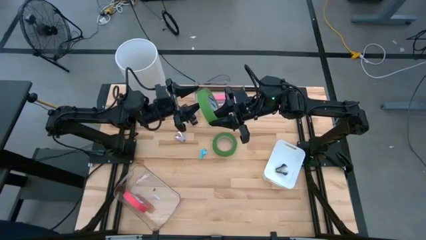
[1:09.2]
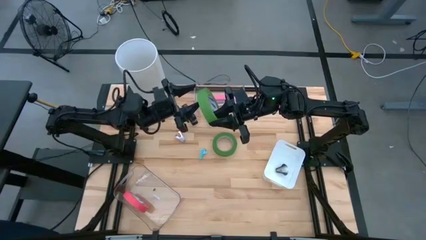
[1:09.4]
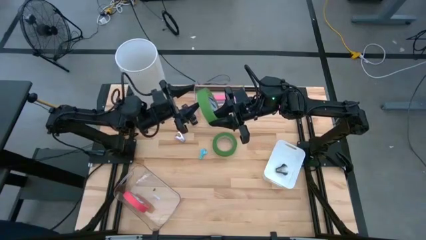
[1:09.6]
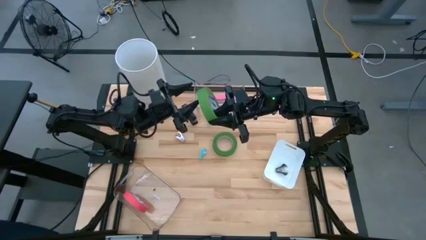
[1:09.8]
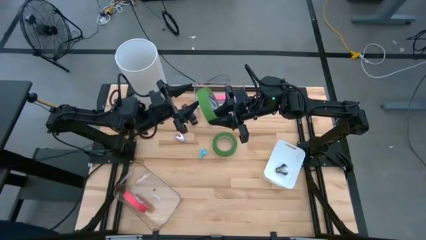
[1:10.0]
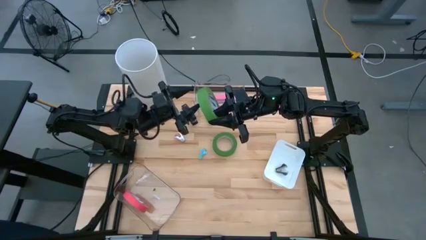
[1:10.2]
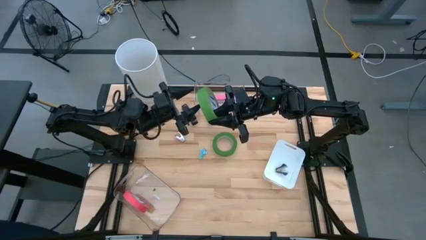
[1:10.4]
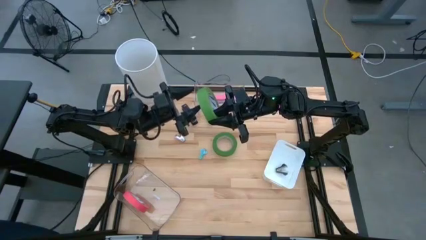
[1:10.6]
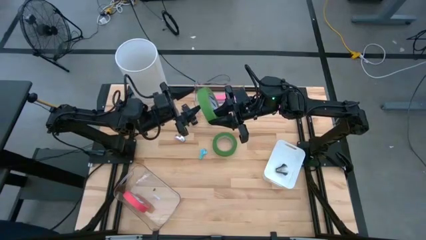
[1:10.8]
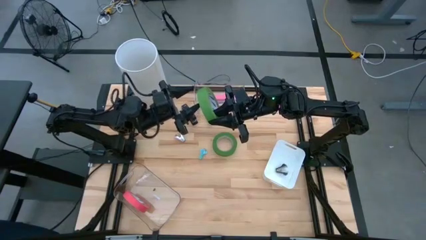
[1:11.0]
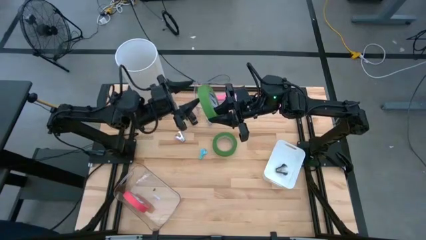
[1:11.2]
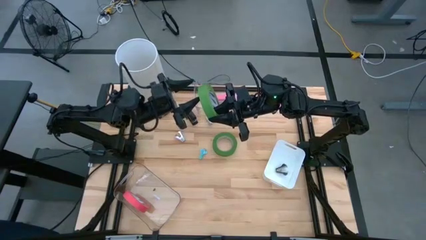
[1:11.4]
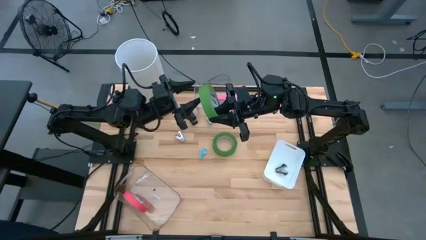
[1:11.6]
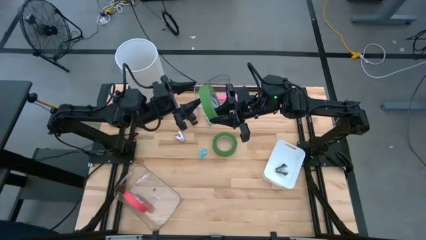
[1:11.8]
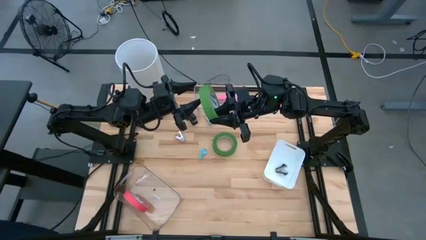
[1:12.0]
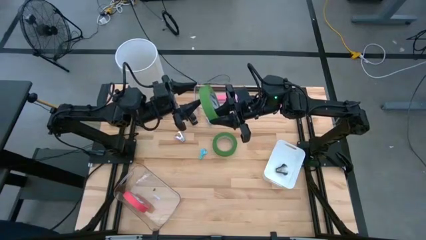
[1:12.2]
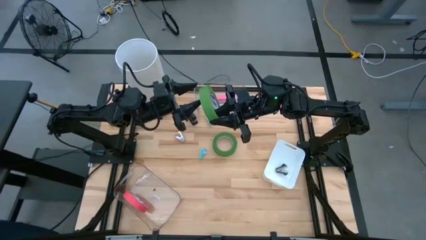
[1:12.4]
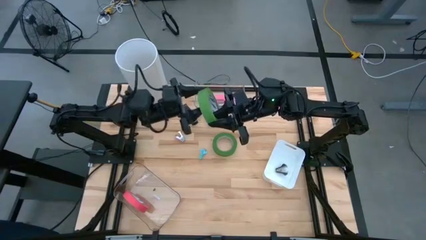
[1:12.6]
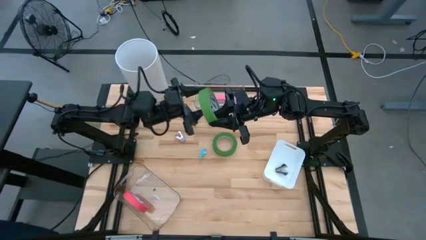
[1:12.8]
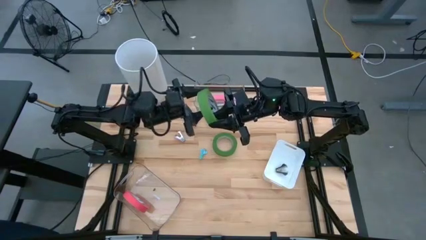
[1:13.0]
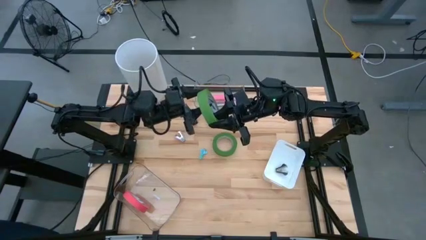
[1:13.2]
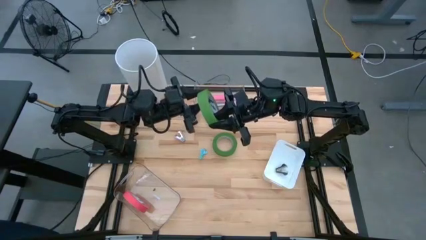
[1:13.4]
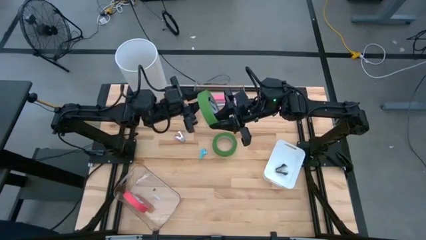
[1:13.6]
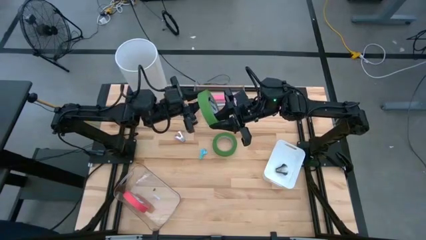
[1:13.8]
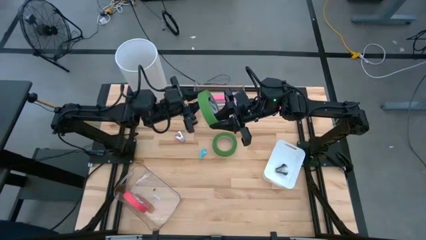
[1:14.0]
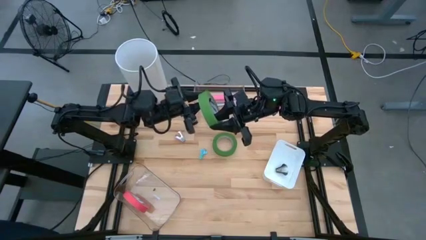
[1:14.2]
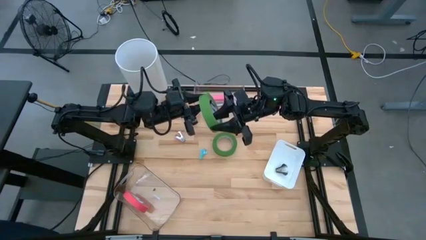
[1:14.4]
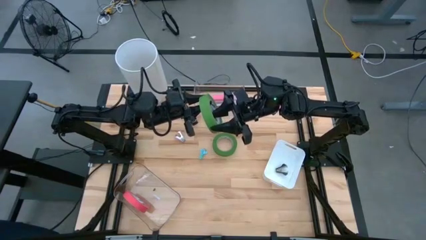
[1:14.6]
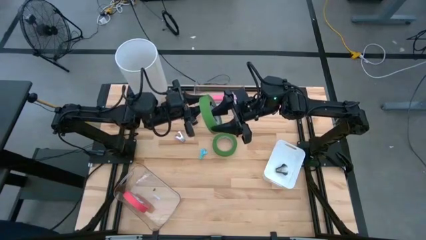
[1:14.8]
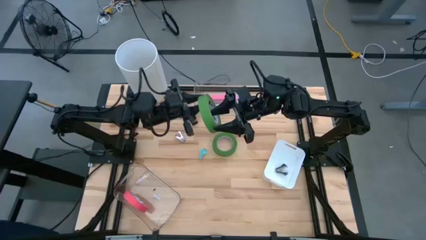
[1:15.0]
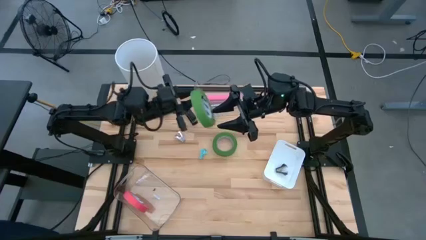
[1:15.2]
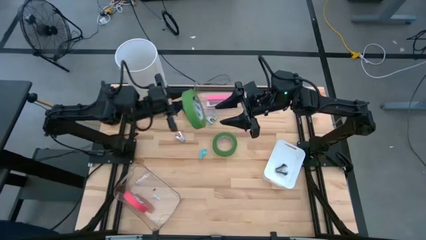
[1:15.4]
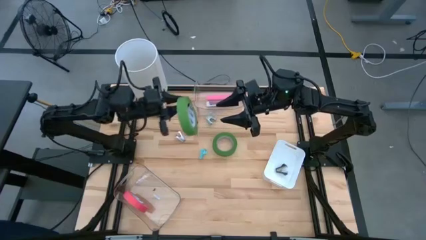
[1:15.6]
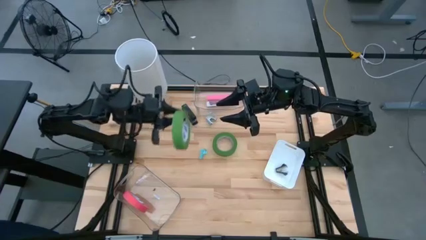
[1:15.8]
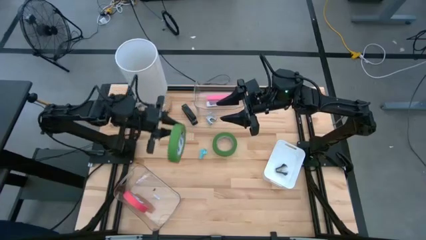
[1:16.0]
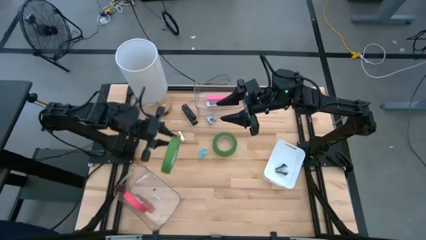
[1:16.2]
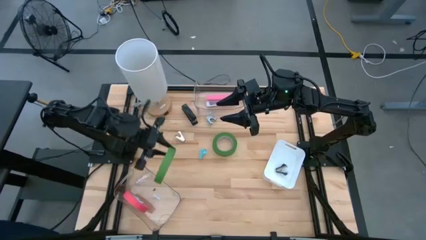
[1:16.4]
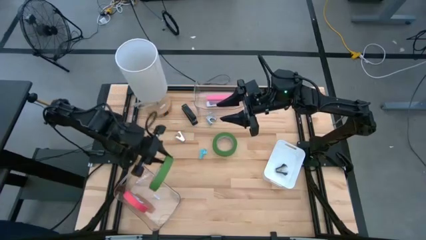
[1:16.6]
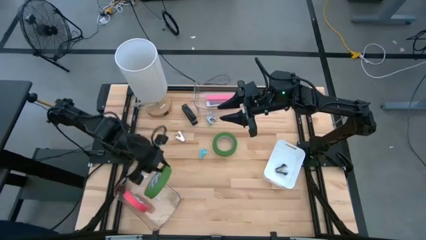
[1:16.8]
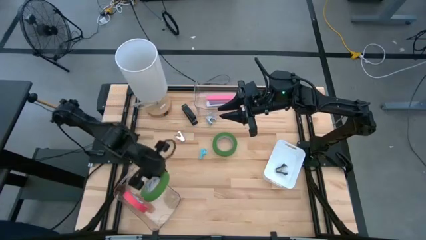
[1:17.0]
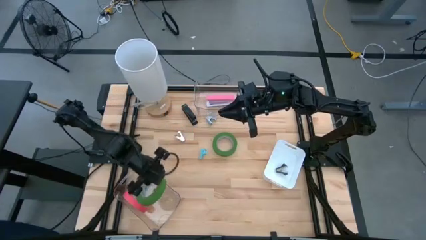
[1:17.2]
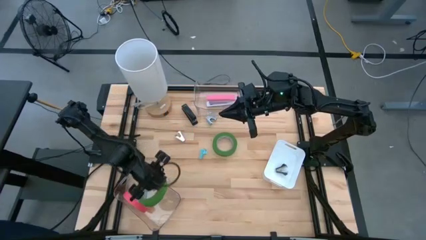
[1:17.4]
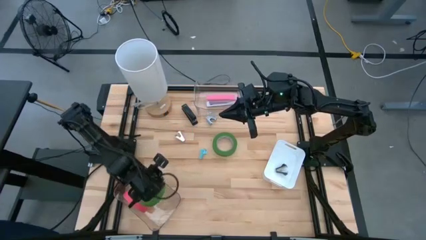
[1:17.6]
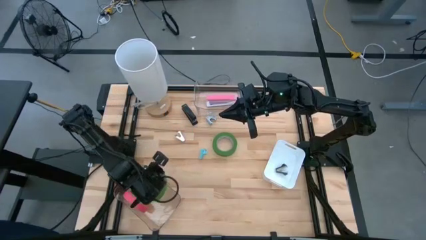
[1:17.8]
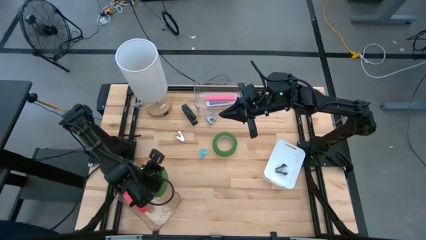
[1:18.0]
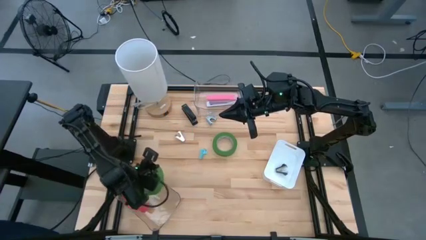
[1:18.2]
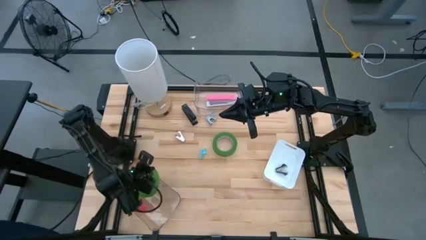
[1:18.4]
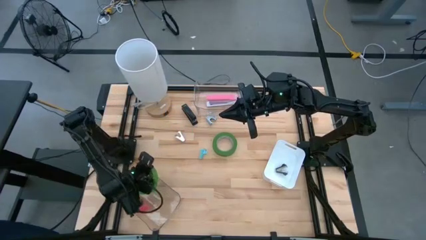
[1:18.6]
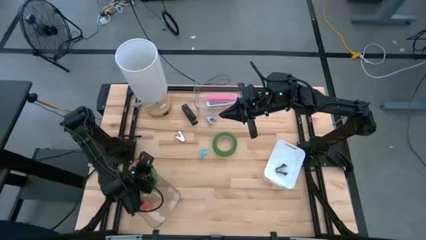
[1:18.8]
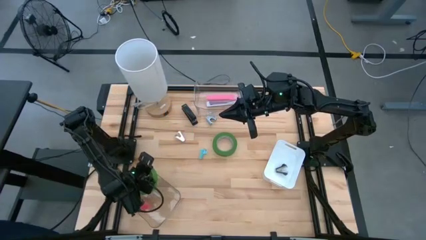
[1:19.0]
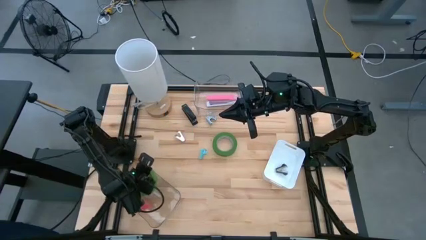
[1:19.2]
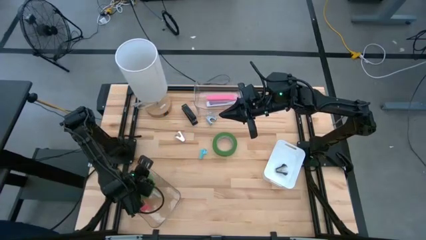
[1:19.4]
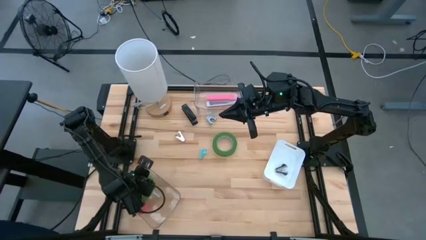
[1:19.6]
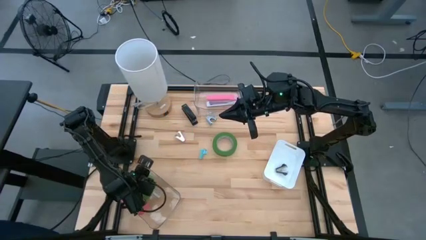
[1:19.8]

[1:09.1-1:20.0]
Task: Pick and place Stapler, Stapler remover, tape
Put the green tape into the bottom transparent bin

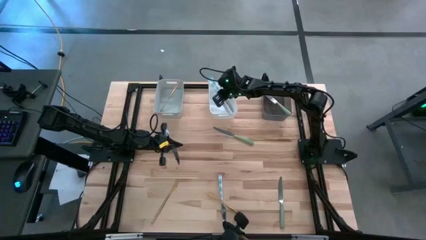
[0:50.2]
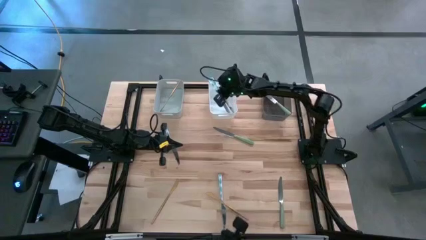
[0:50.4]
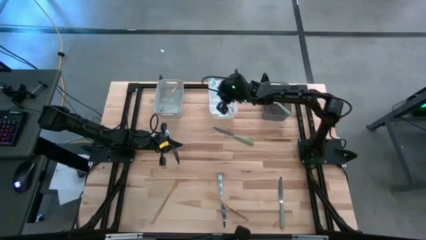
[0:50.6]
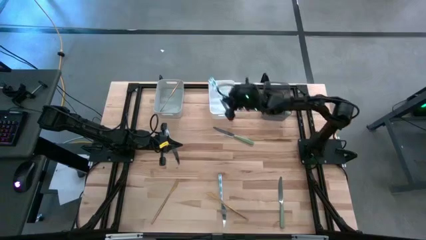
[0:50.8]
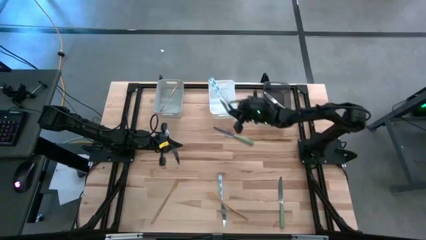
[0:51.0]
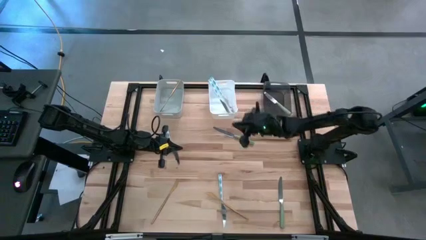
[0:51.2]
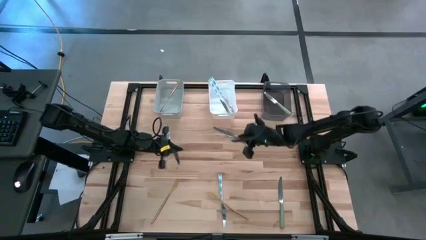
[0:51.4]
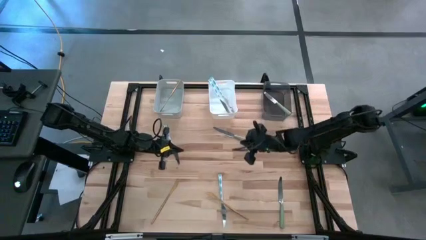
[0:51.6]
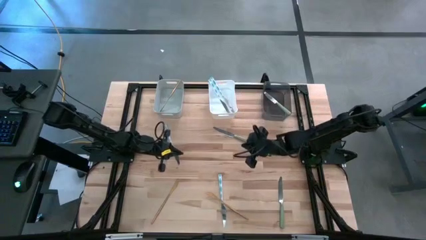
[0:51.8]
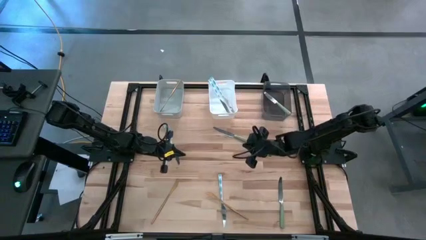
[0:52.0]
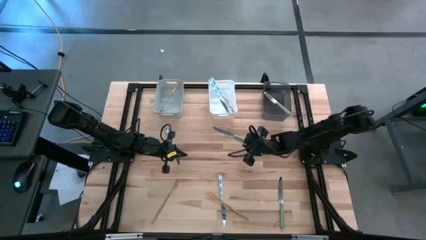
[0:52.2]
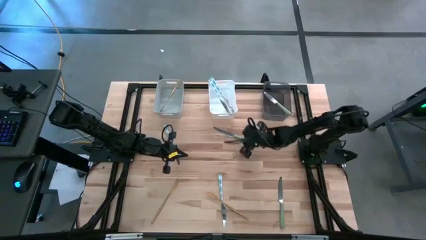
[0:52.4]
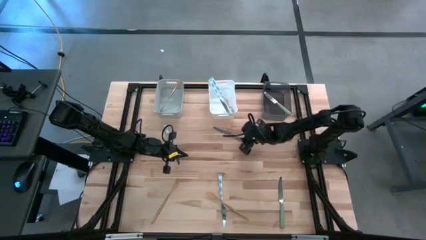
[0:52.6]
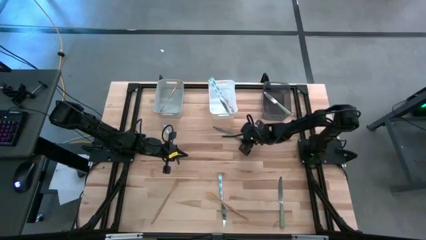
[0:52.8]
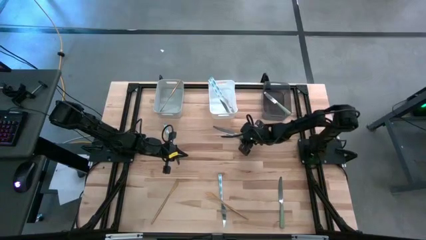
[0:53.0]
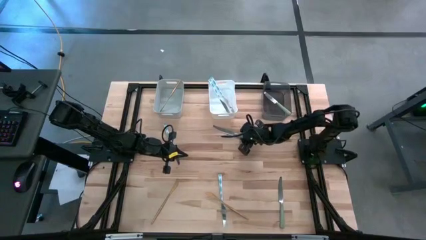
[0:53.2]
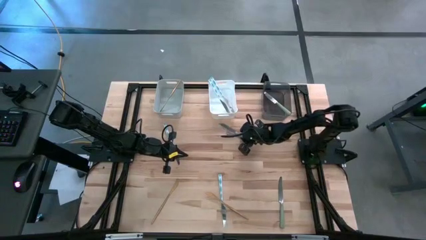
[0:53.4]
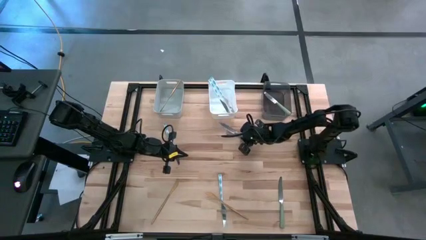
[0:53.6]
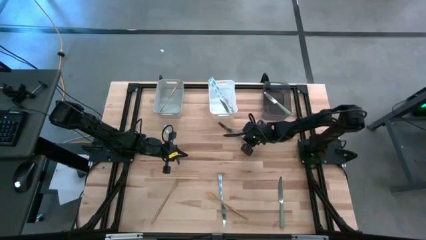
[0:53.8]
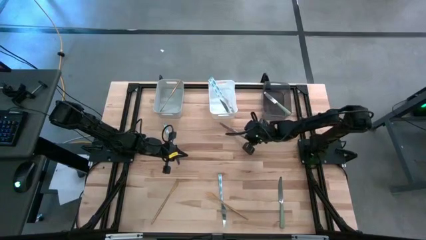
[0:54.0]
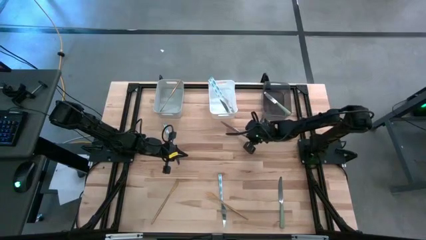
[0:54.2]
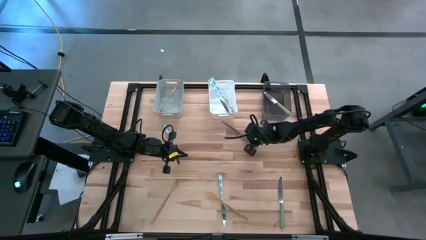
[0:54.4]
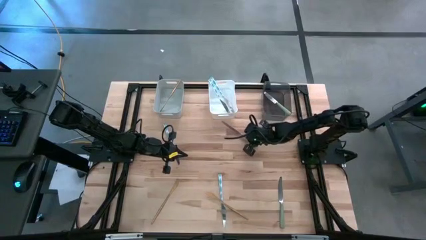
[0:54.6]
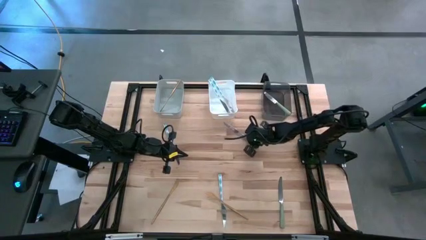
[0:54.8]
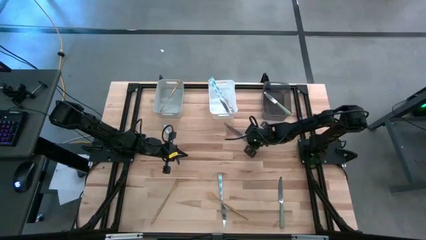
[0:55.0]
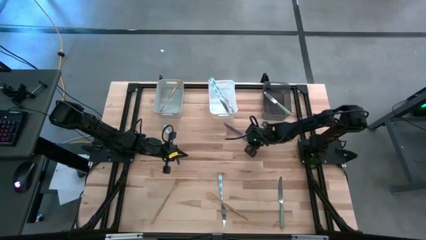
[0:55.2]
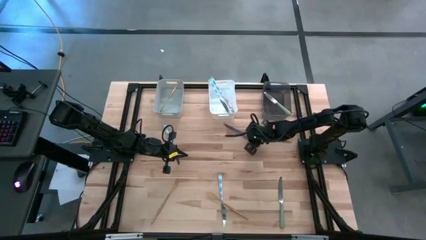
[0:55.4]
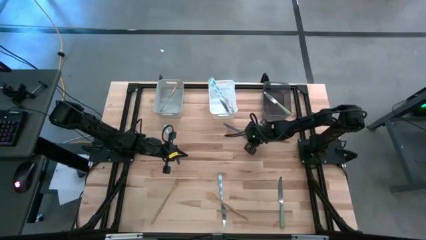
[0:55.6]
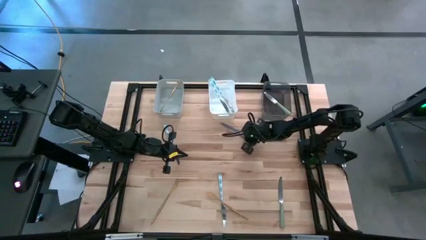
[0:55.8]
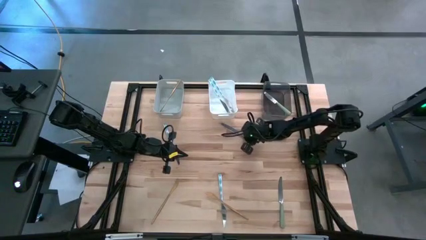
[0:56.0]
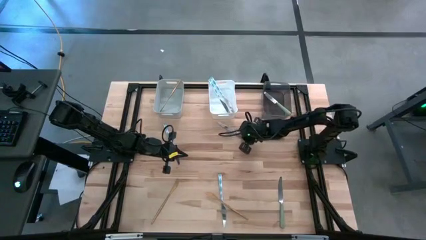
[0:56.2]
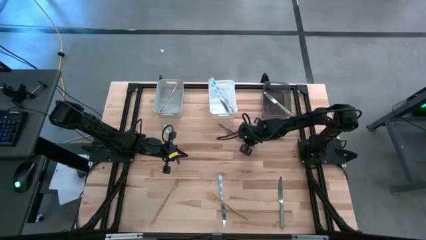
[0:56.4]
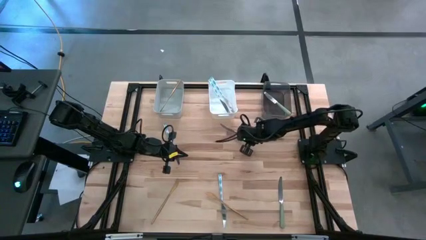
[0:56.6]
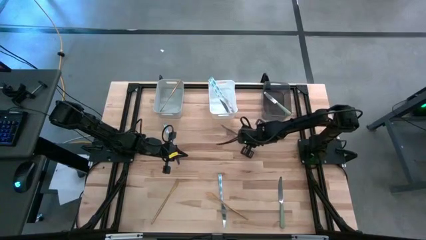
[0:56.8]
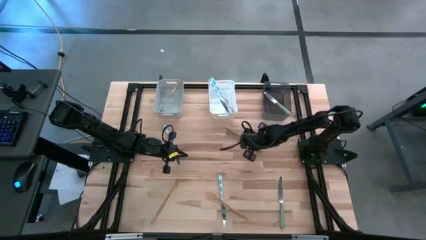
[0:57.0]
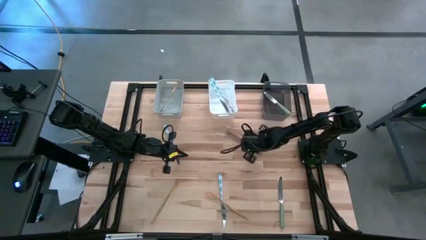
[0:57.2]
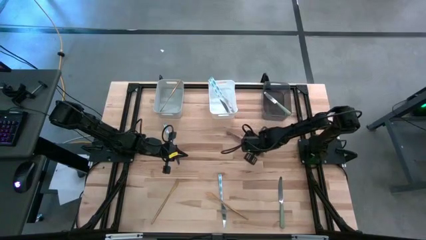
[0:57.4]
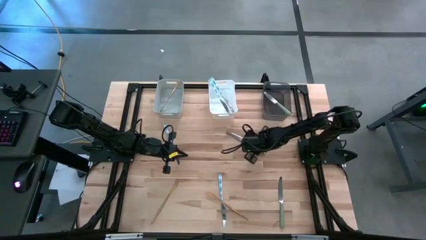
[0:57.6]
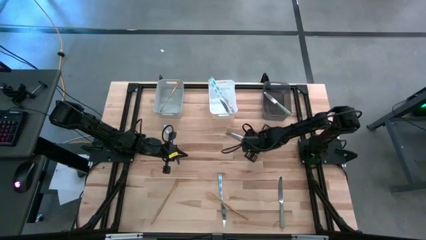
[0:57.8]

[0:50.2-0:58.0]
Task: Sort silverware by color (type)
Put the top green table knife into the black bin
